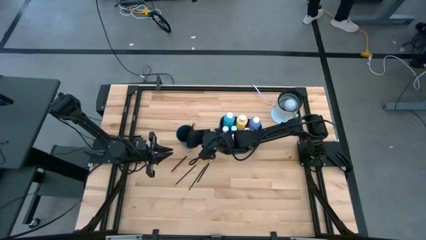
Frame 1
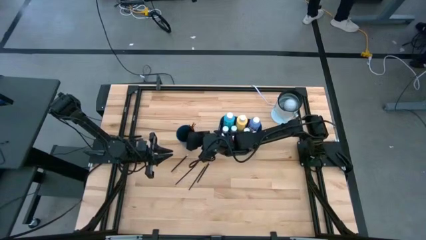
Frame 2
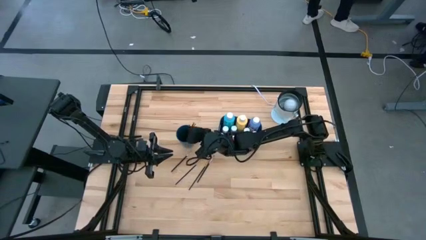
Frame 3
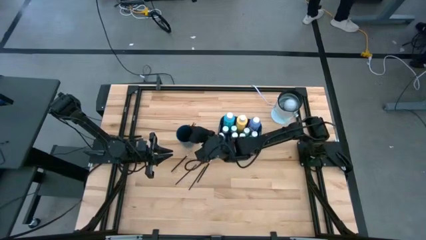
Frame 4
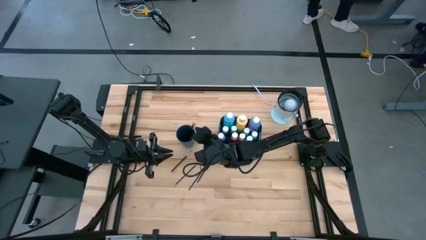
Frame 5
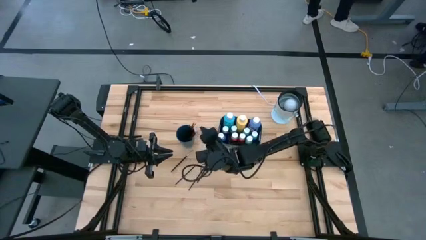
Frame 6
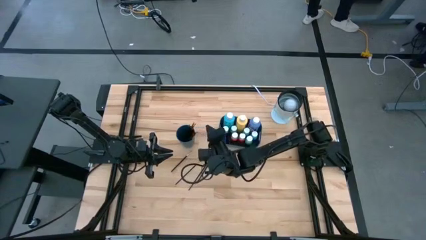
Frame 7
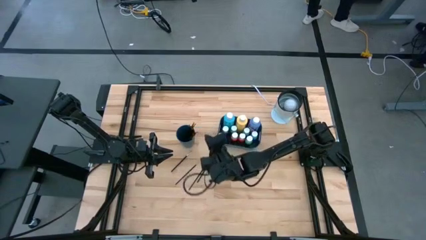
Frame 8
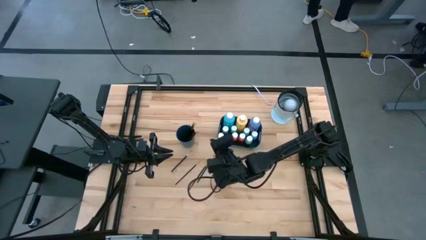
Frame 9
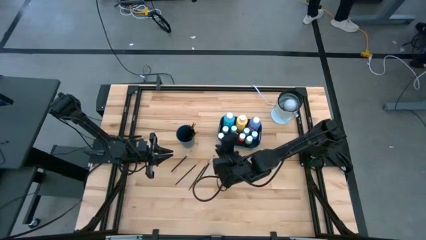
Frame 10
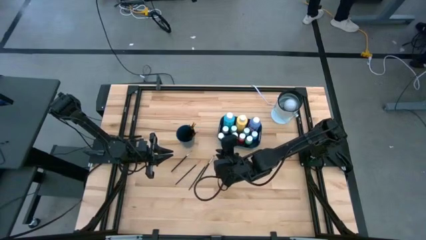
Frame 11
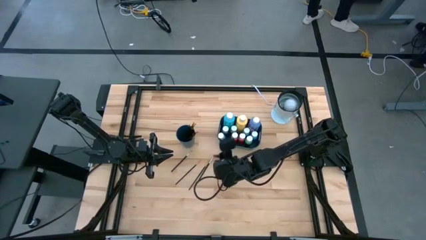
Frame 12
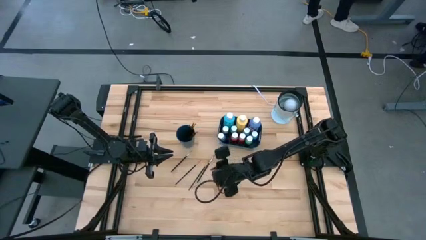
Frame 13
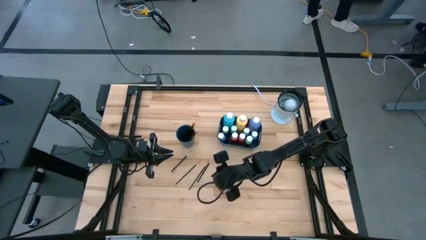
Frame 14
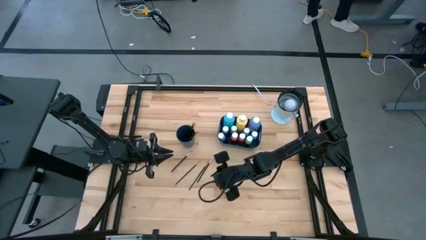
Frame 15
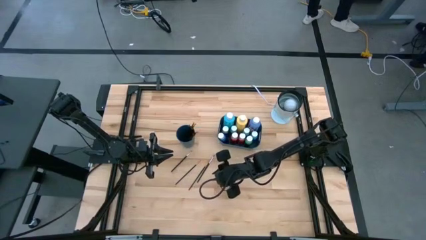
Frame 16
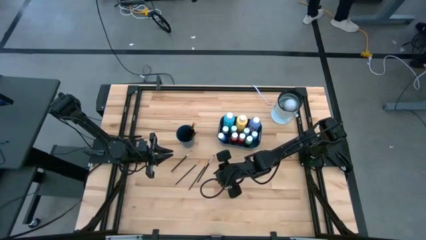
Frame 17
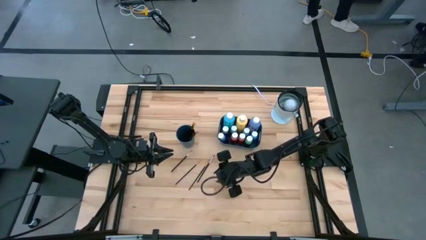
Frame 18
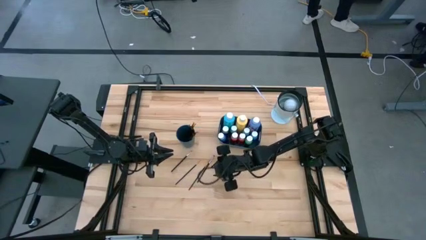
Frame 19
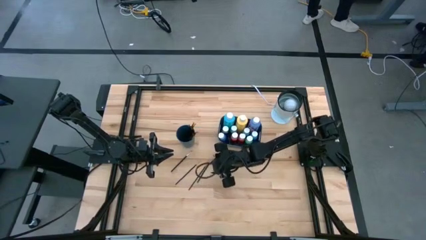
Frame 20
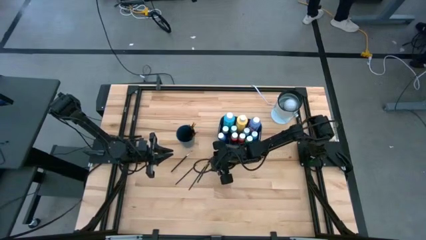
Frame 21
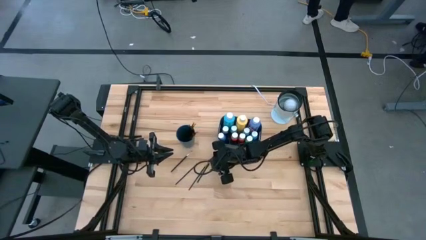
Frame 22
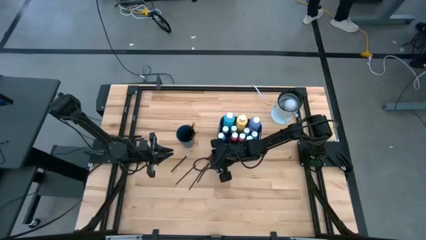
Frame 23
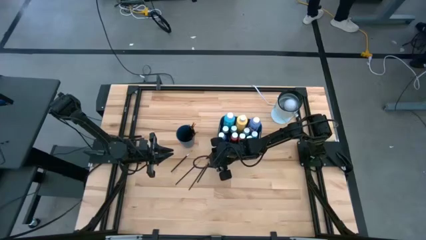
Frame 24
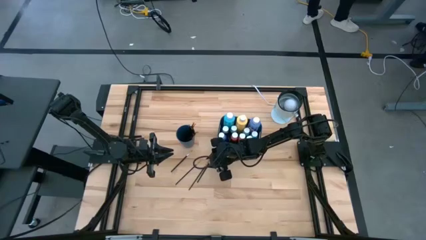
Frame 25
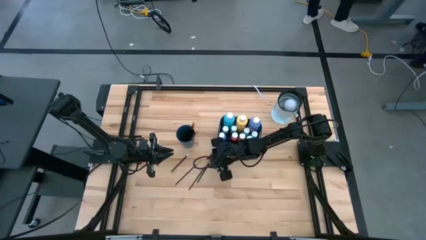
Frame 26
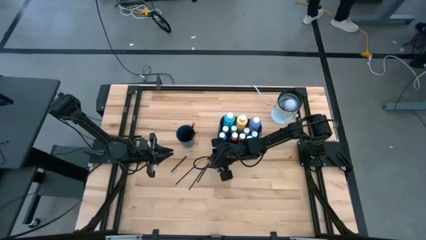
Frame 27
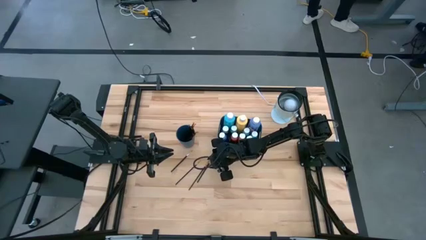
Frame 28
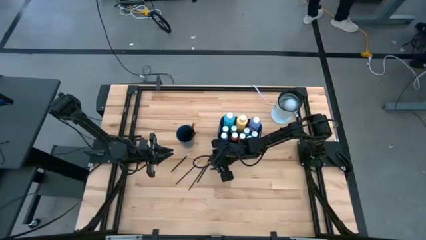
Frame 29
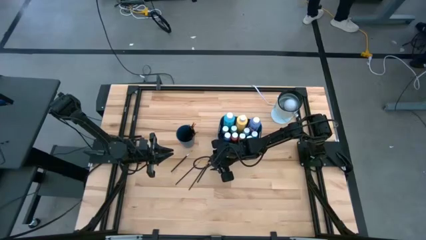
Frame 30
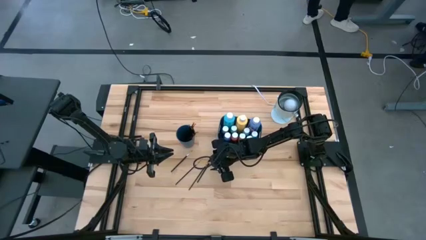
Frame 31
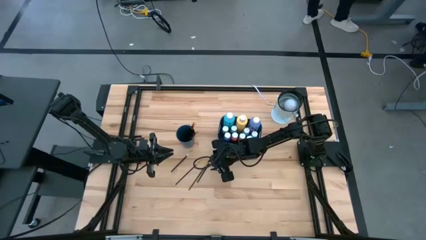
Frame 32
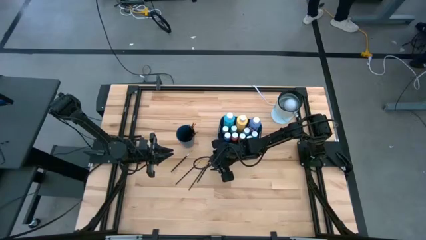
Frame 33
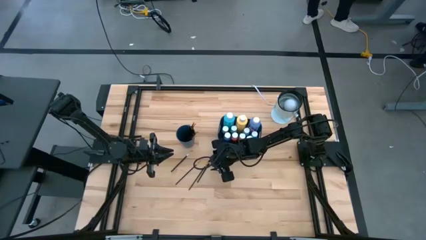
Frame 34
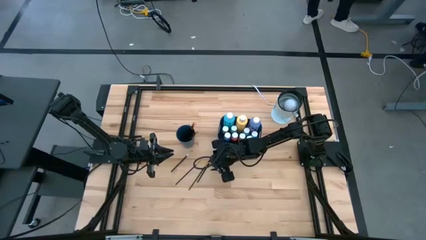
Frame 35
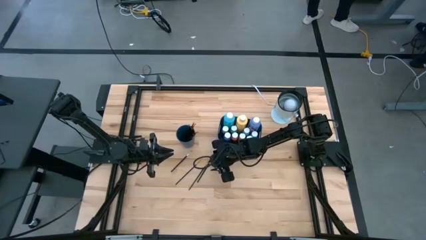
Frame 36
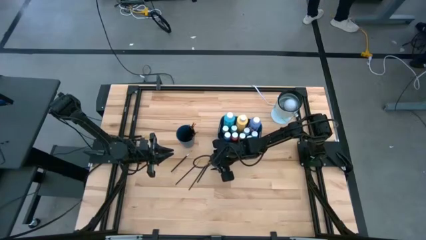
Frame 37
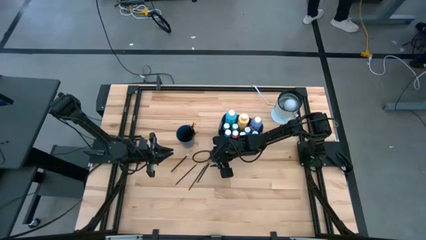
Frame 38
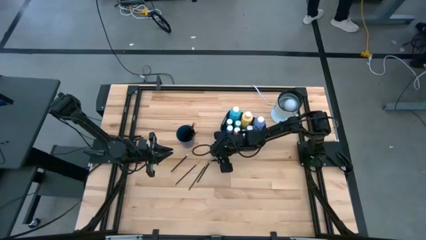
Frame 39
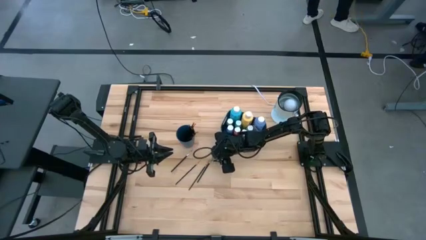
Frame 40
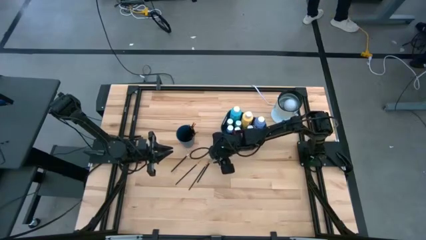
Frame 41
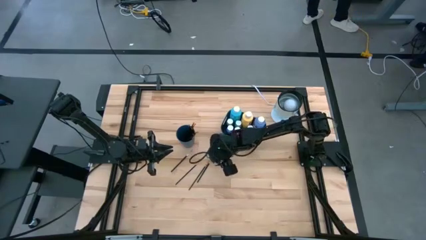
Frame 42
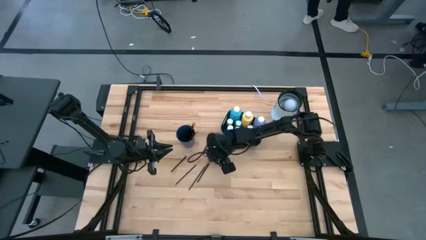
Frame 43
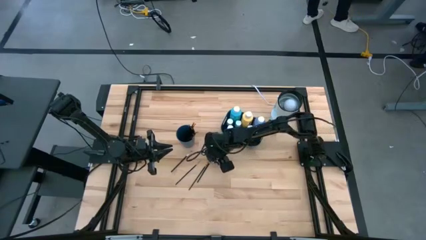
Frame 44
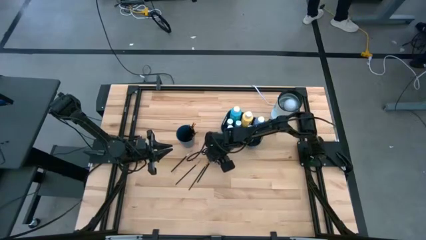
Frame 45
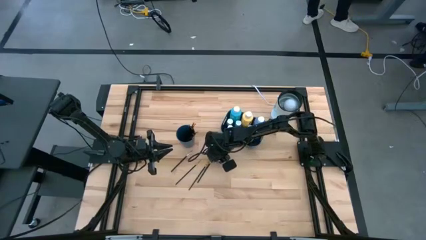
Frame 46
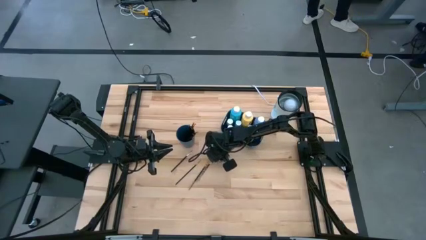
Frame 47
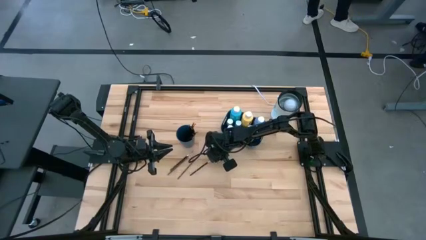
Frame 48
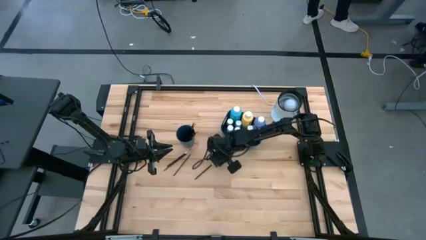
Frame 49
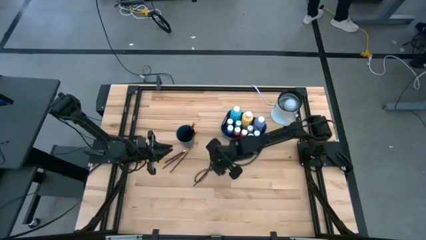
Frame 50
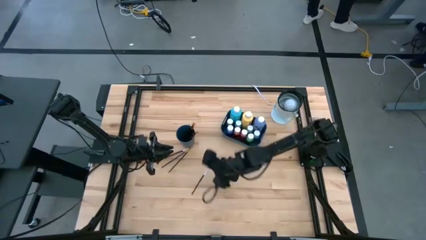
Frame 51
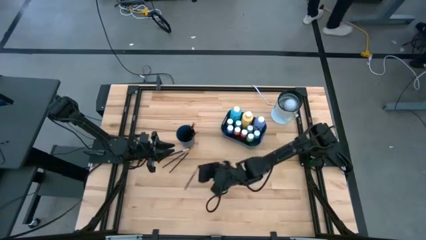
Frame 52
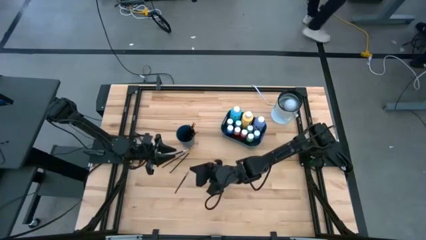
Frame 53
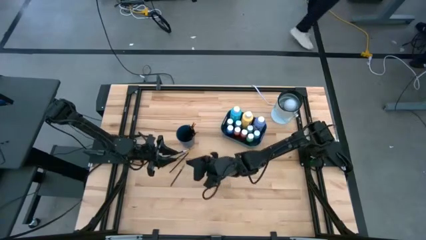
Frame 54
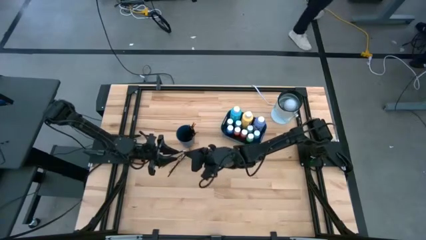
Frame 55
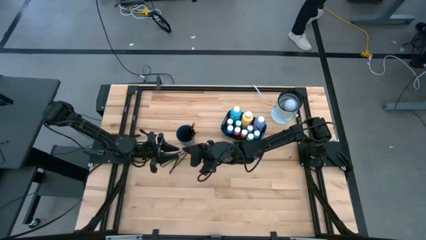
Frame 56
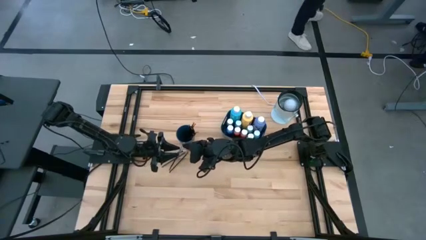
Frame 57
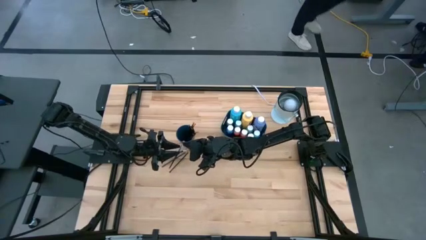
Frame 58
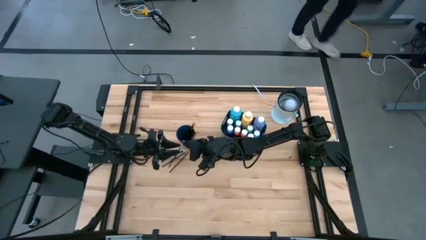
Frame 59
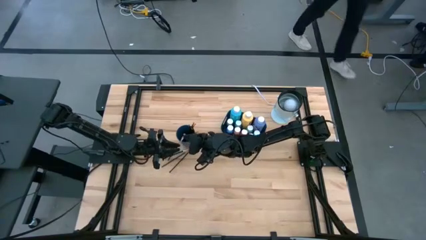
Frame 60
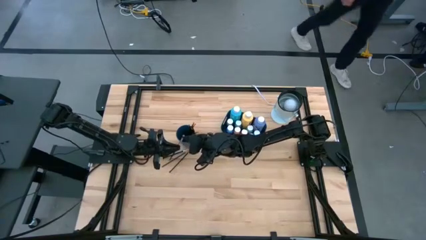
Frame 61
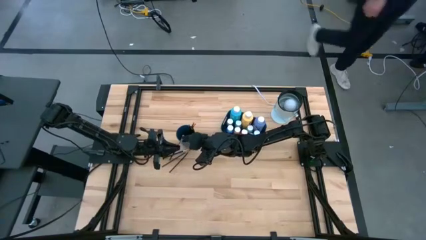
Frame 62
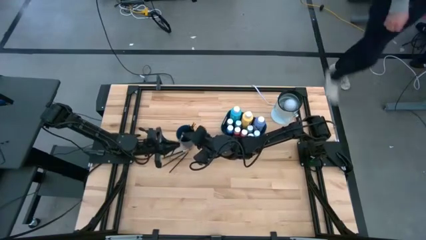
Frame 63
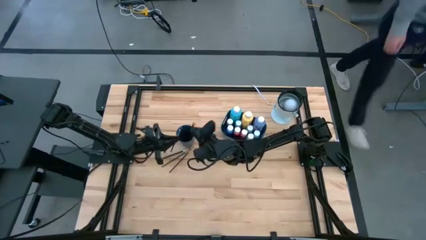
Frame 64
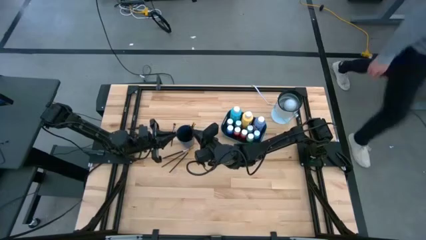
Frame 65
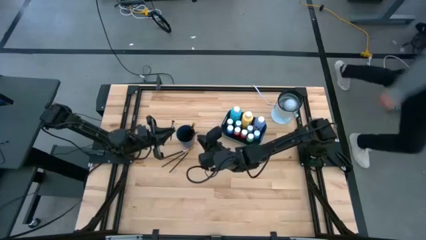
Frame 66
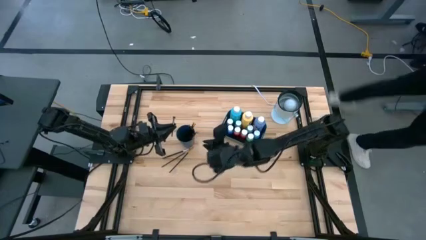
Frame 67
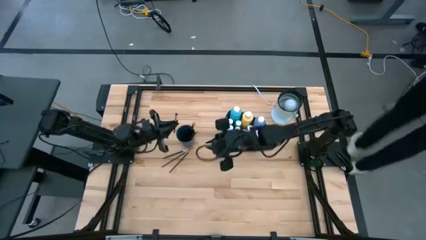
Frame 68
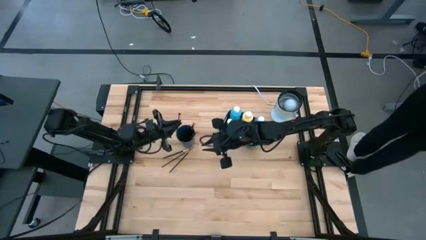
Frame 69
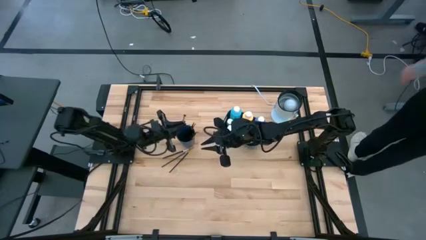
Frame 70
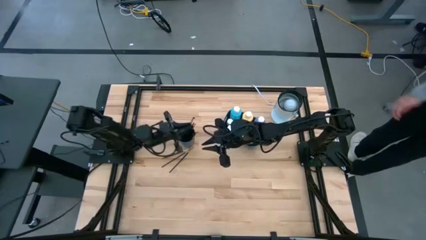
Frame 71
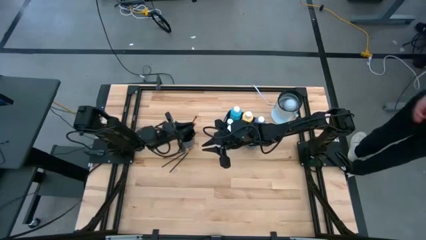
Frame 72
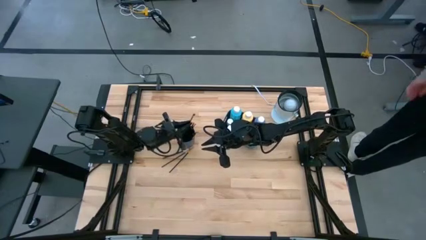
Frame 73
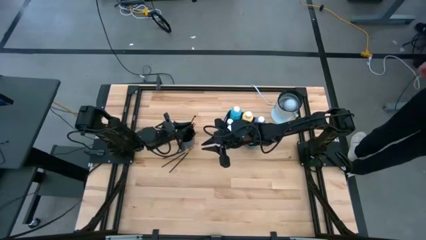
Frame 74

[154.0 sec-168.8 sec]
Task: Pick & Place Paint Supplies
Put the silver paintbrush into the blue cup

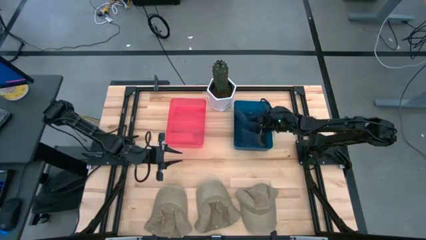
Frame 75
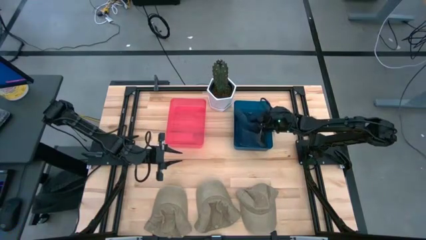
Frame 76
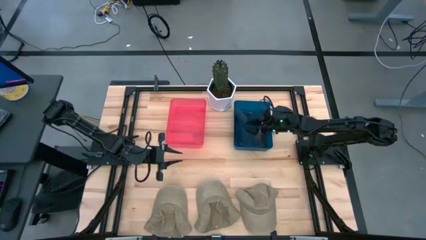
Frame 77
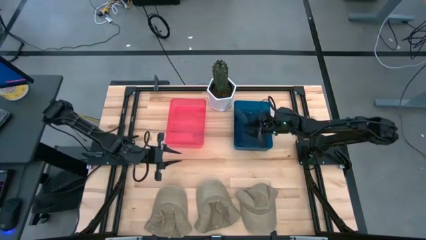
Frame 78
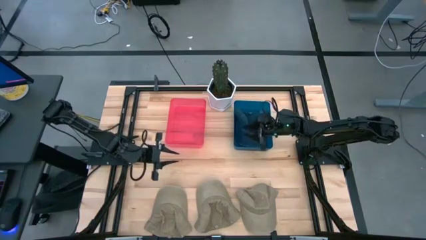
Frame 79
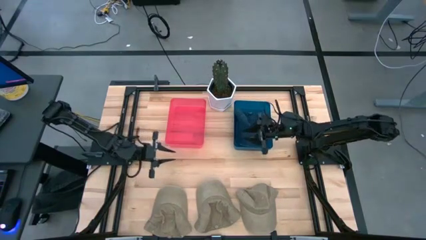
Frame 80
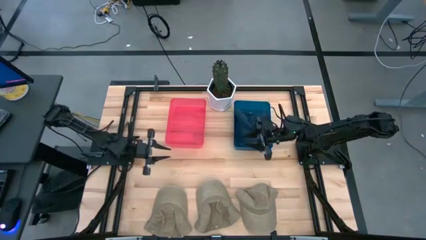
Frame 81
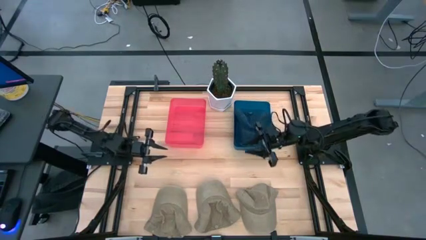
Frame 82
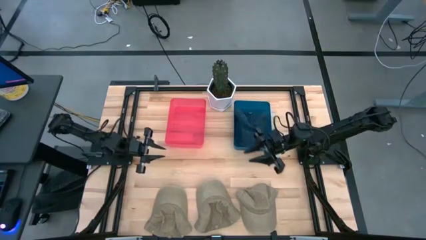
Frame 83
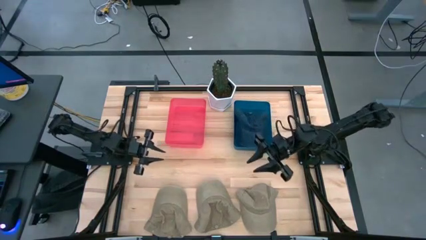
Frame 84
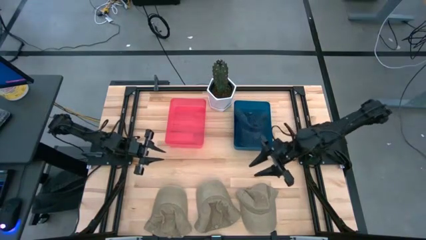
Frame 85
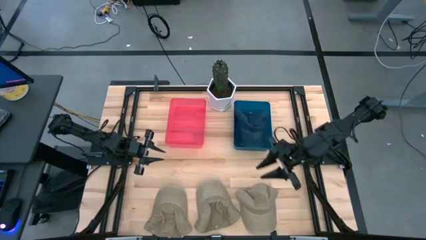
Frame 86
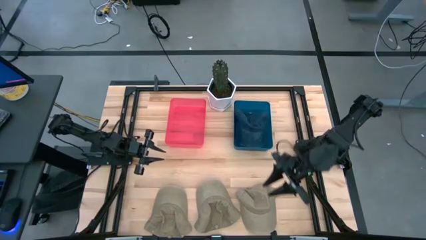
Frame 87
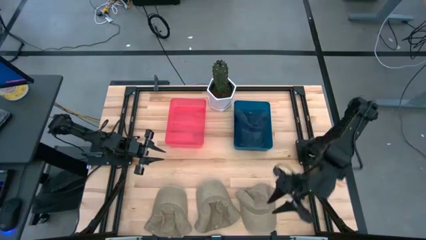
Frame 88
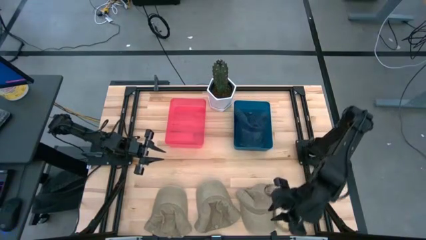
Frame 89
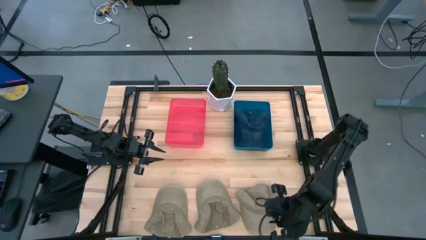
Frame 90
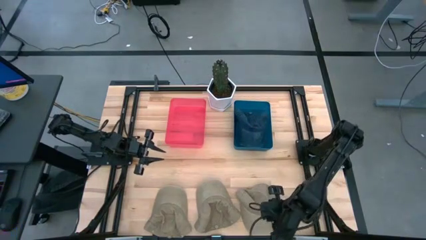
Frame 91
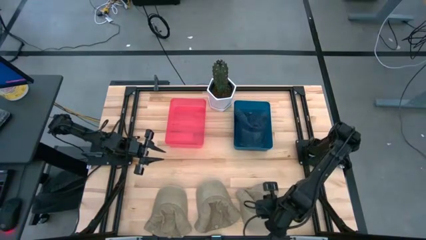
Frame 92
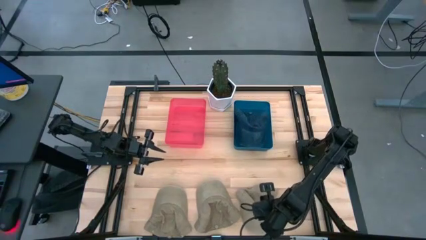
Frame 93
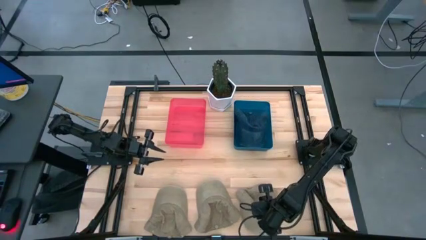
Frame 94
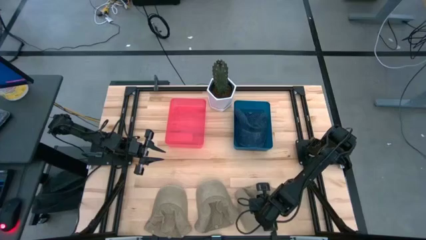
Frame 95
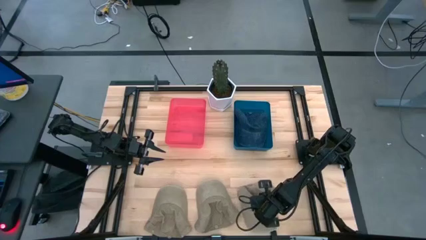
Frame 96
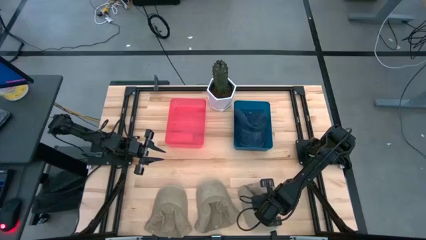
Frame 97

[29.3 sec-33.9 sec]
Task: Pick & Place hat
Put the right brown cap into the red bin
